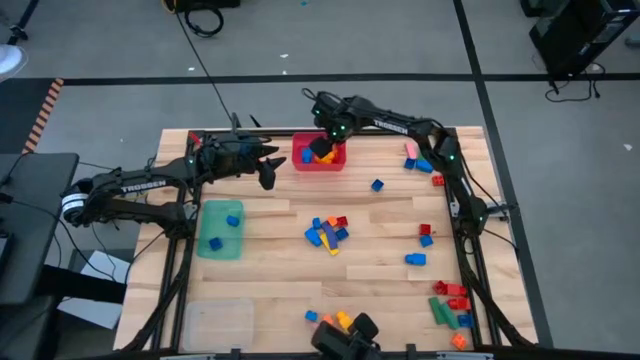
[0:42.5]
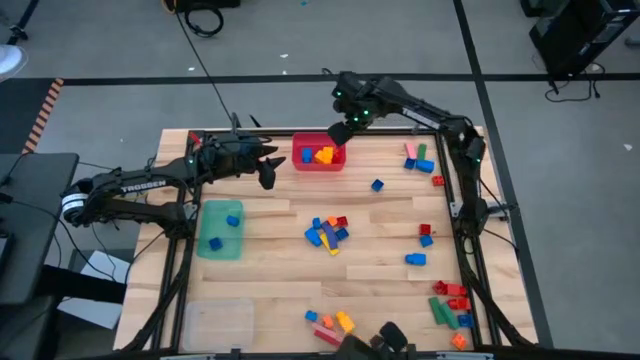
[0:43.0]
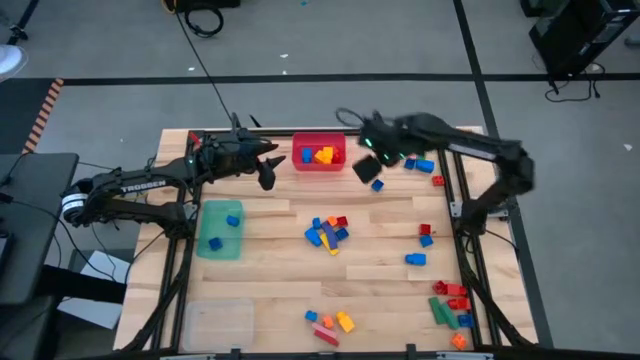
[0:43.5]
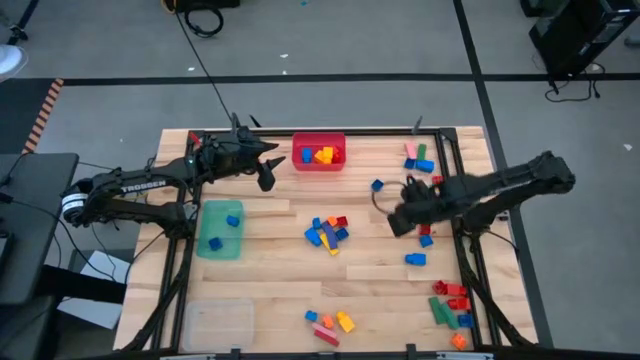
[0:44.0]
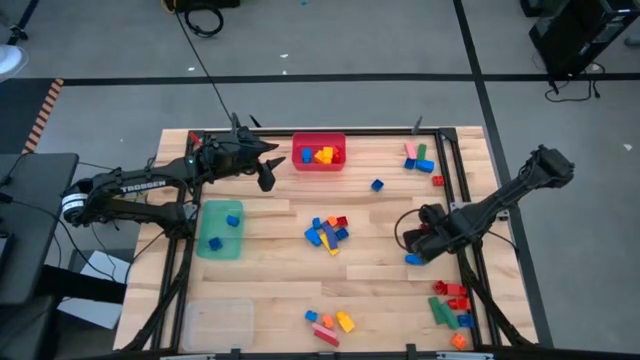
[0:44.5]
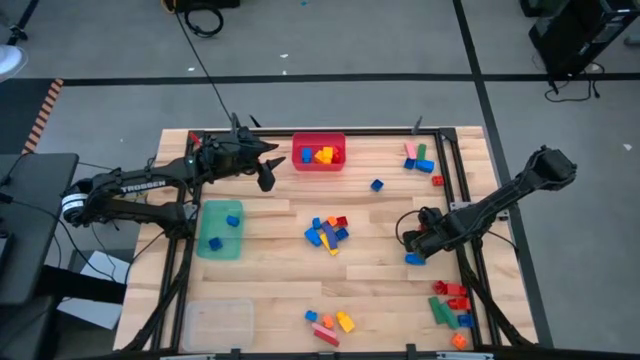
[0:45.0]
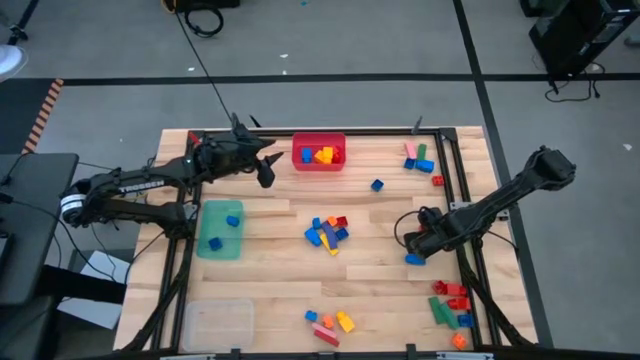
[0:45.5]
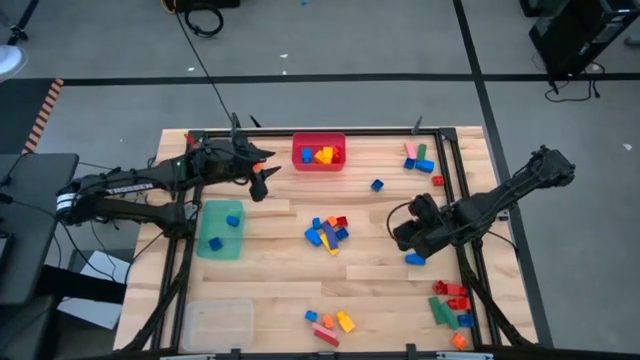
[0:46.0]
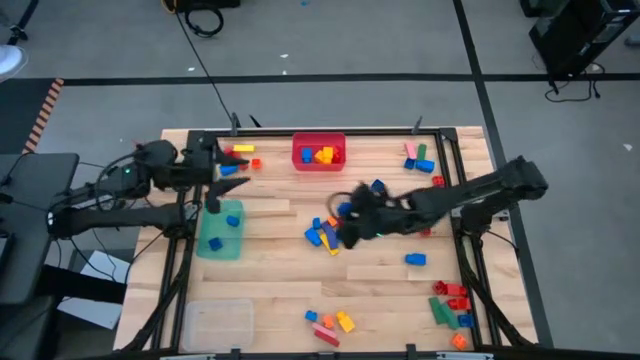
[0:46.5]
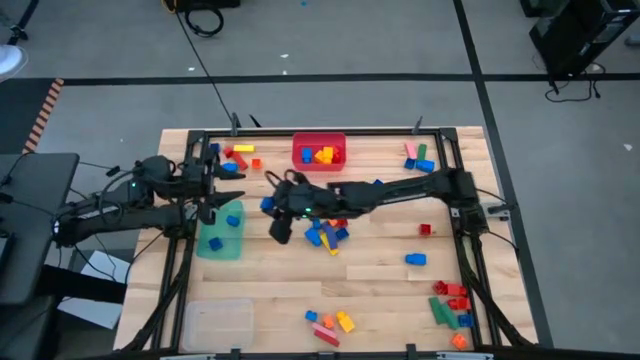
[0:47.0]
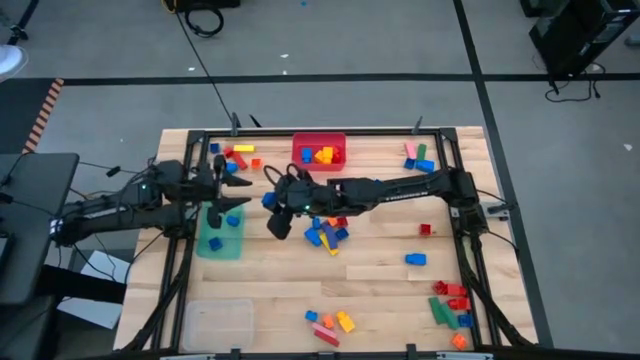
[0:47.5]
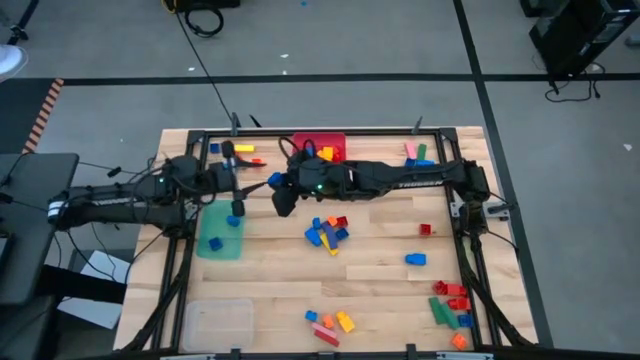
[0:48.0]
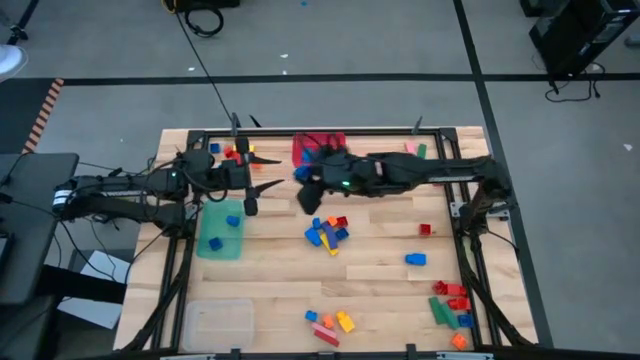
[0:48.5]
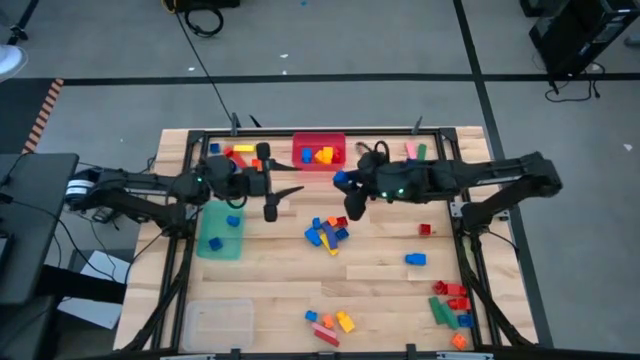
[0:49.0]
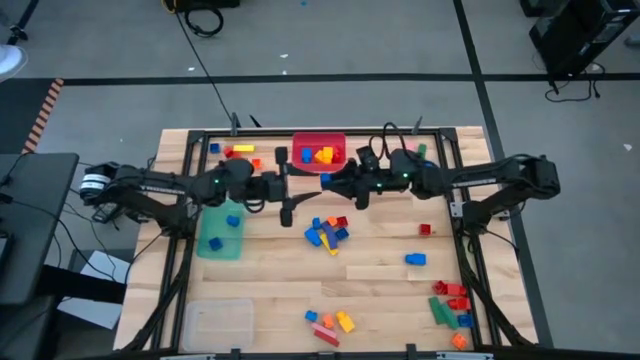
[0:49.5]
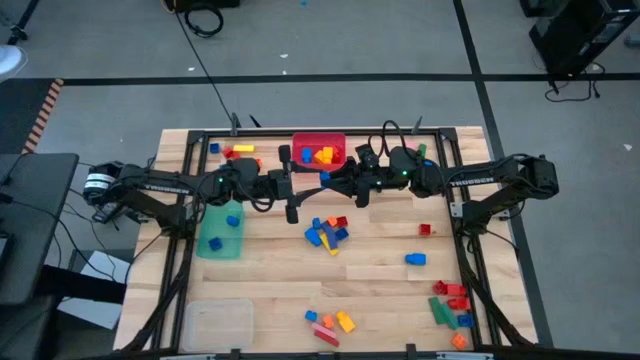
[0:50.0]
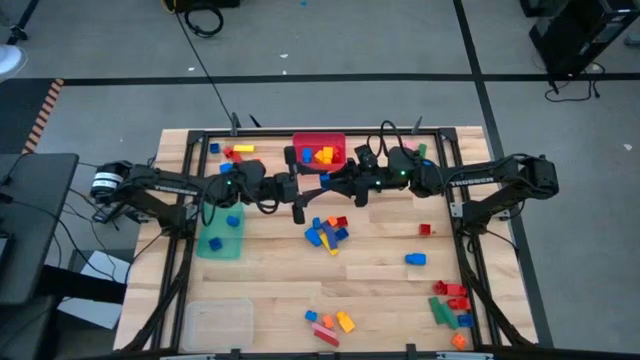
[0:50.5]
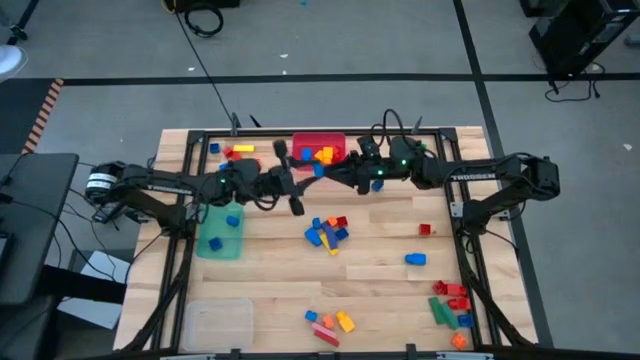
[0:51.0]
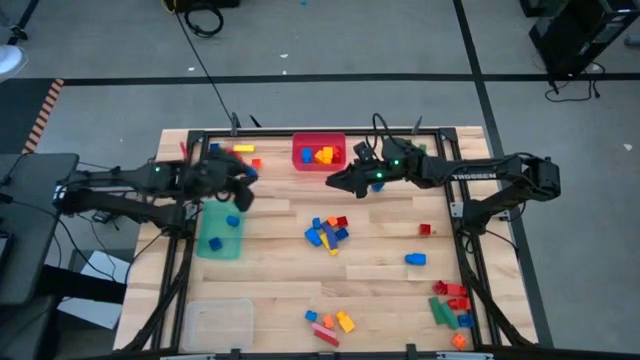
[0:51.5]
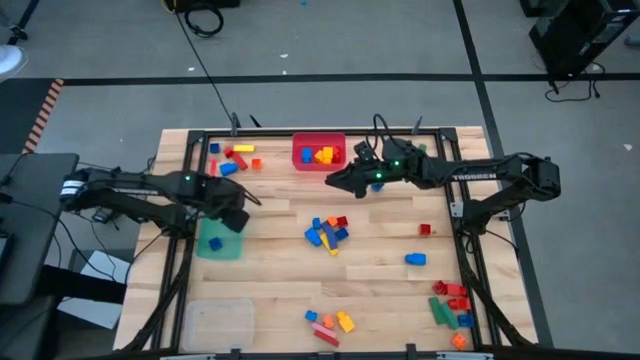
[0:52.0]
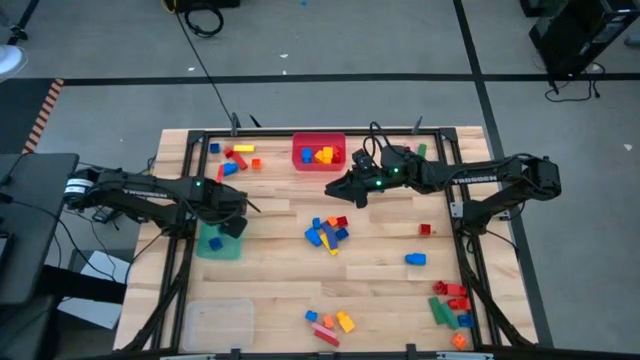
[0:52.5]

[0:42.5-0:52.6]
Task: Sort blocks by size
Put the blue 4 studded building block into the teal bin

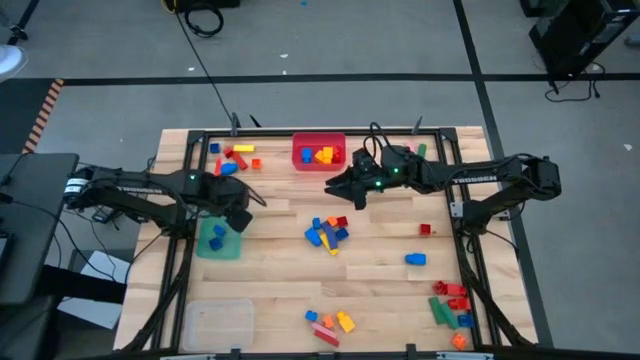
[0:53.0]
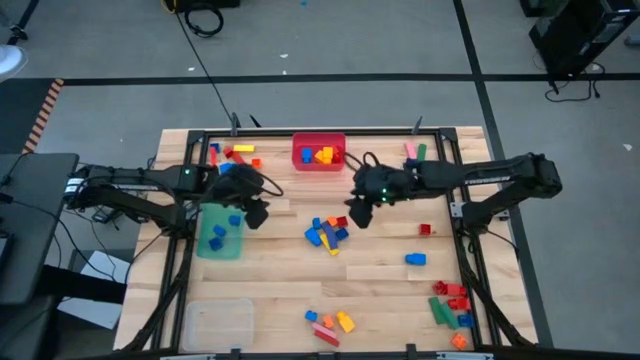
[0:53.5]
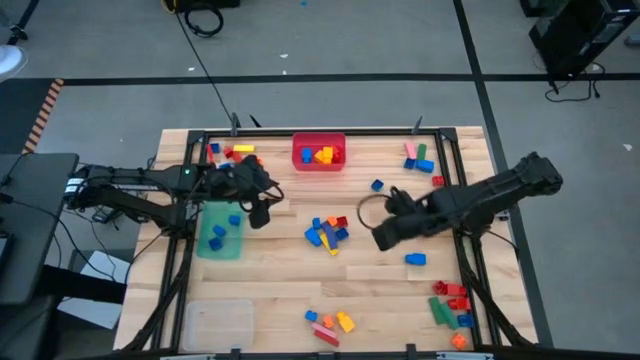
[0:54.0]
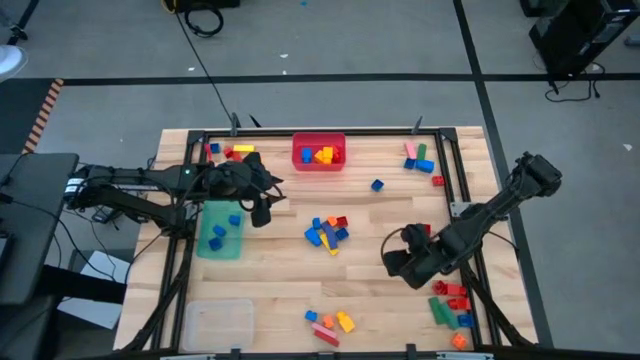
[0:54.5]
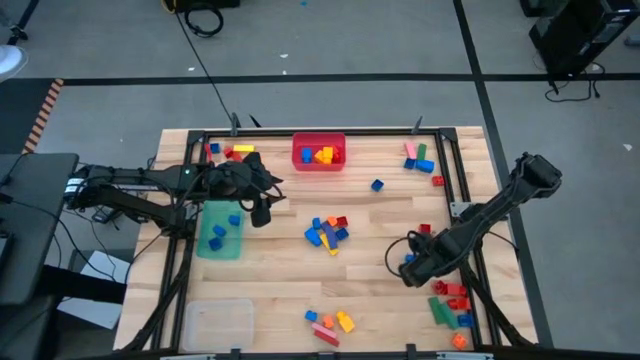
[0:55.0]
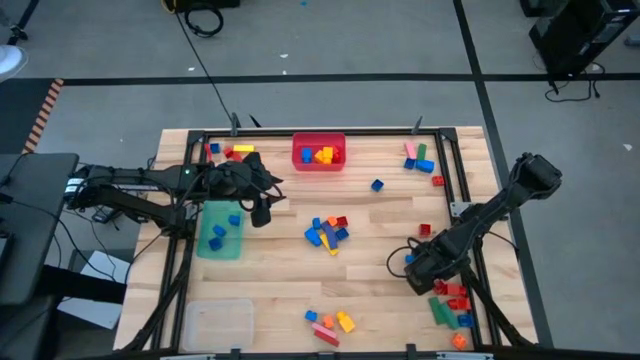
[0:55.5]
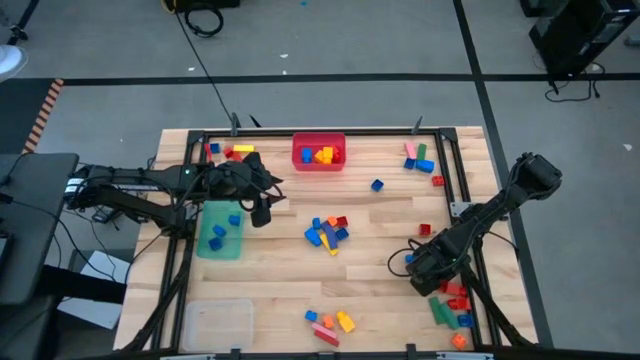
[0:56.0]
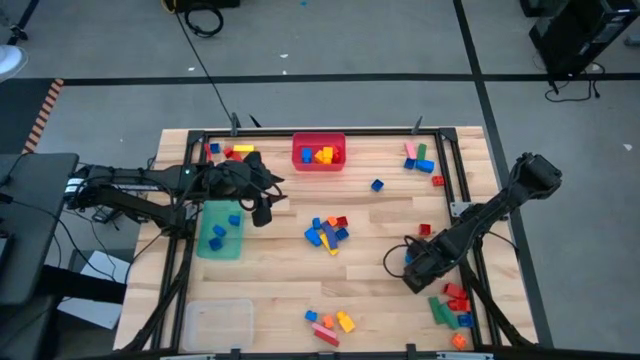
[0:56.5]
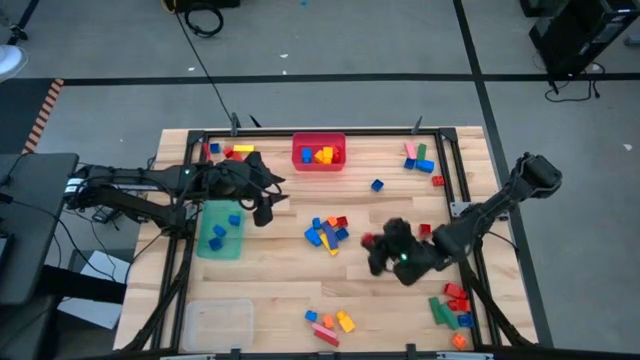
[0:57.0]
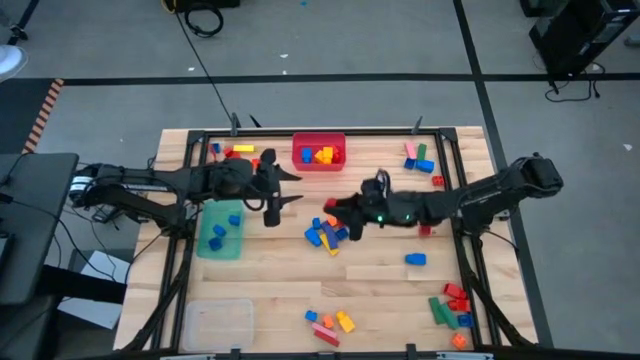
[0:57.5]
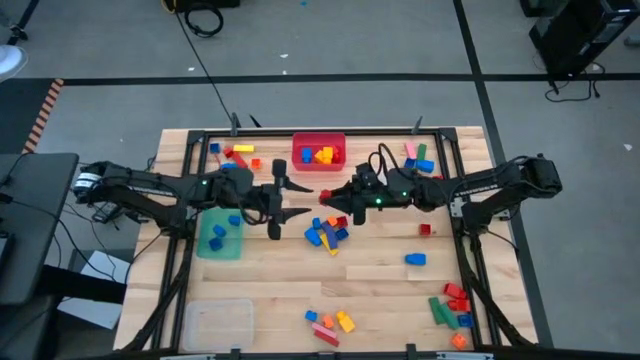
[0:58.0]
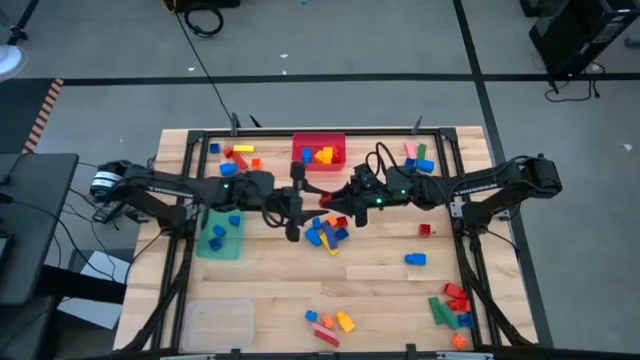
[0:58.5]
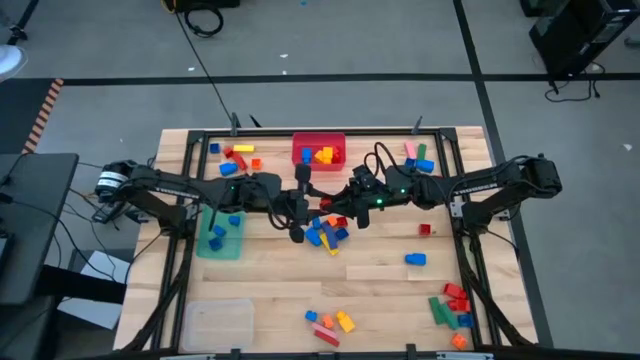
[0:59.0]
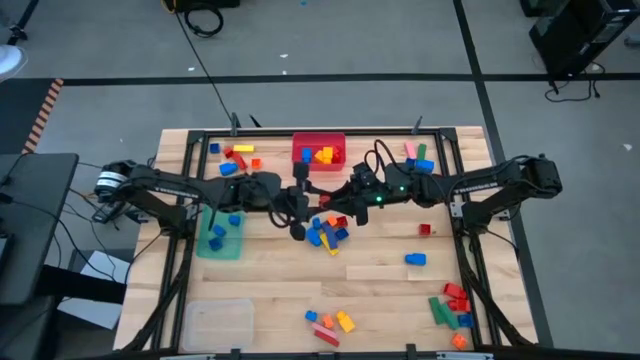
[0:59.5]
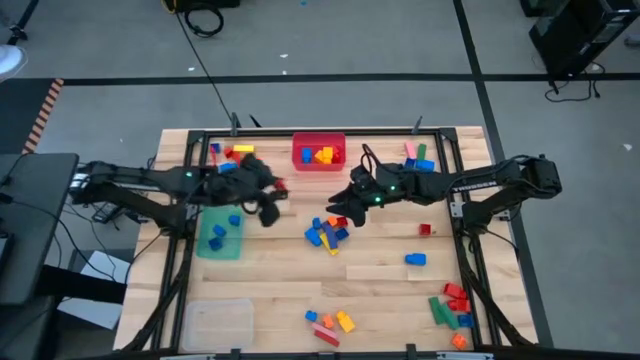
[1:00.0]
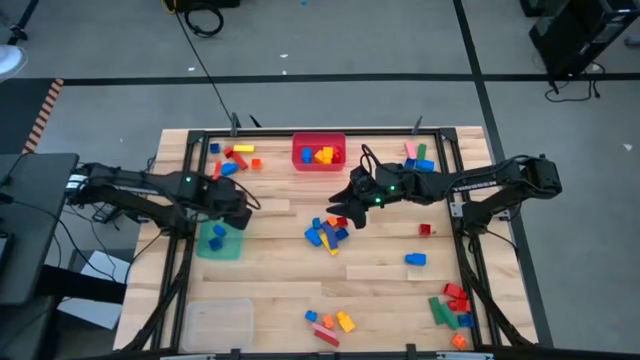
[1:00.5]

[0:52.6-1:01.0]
Put the red 4 studded building block into the teal bin

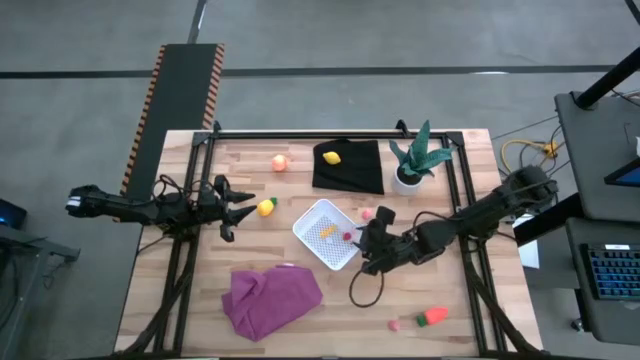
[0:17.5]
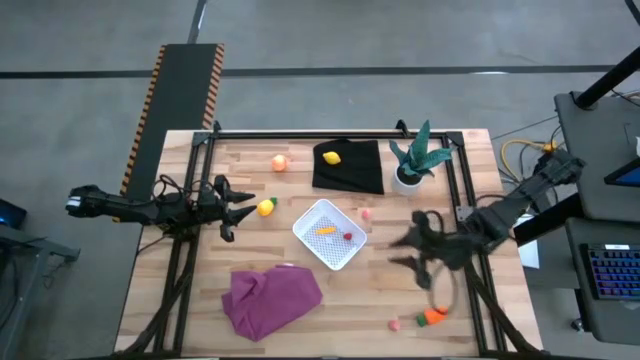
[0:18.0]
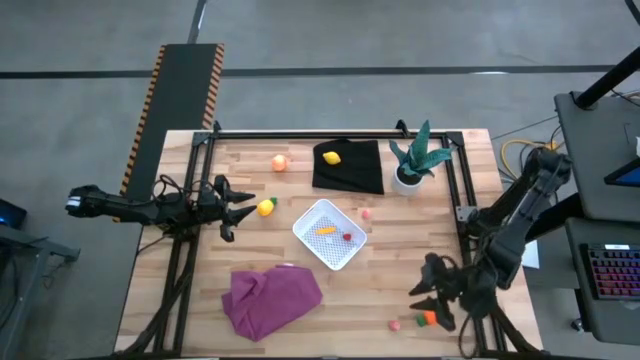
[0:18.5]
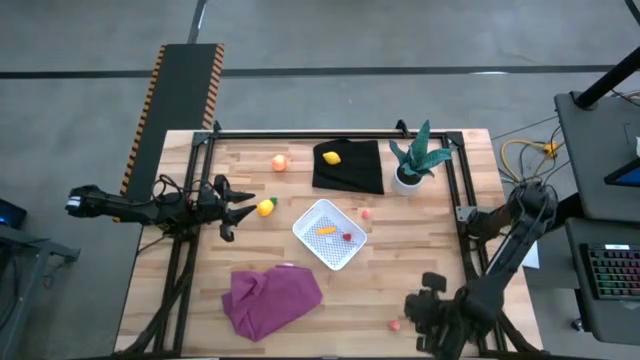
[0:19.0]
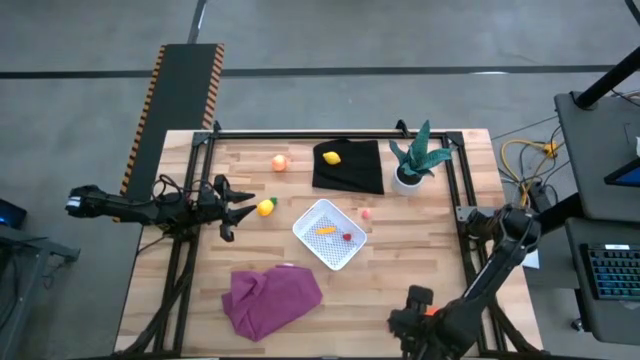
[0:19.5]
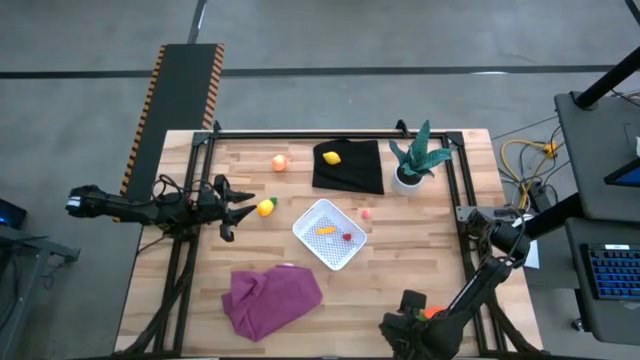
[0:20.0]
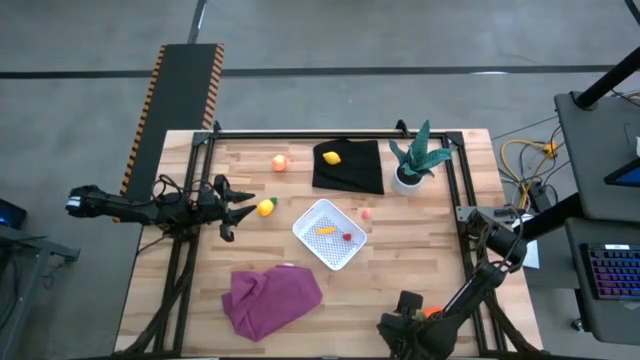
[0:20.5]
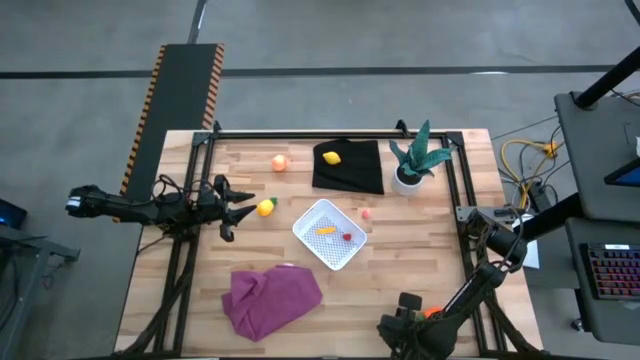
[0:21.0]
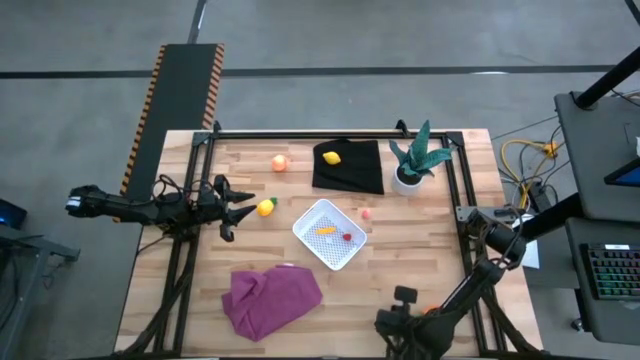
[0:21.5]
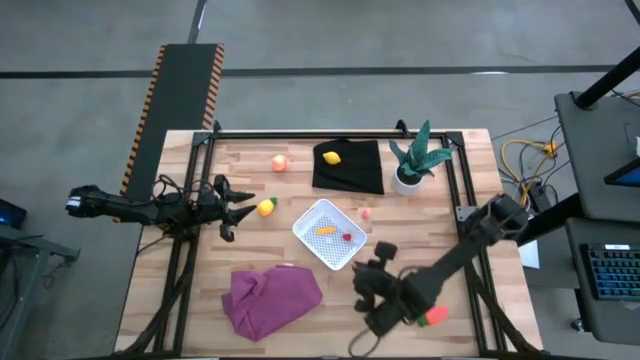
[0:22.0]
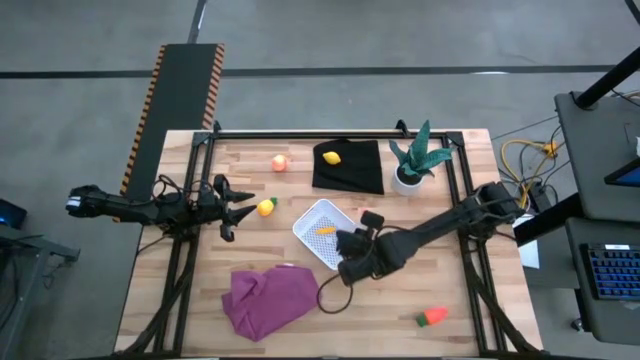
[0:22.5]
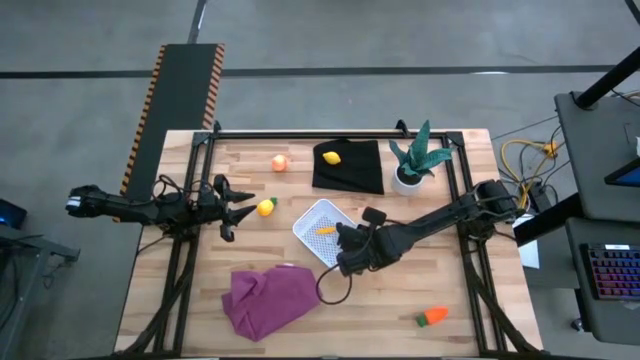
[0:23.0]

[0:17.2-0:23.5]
Task: Pick and placing Produce into tupperware
Put the bottom small peach into the white bin
